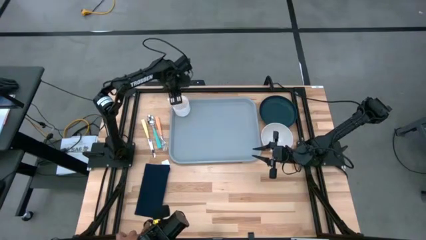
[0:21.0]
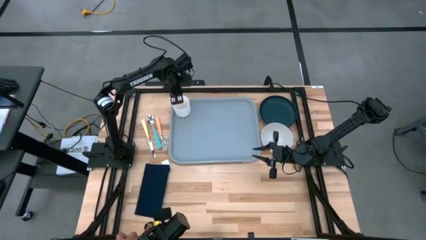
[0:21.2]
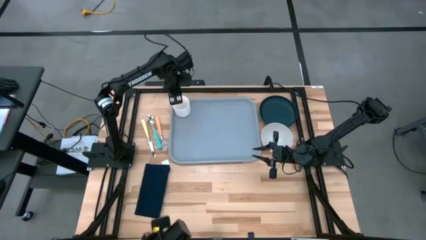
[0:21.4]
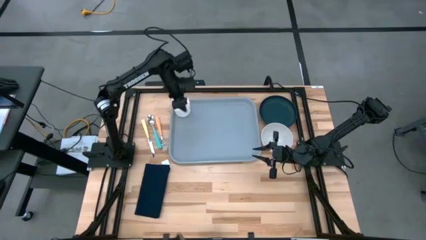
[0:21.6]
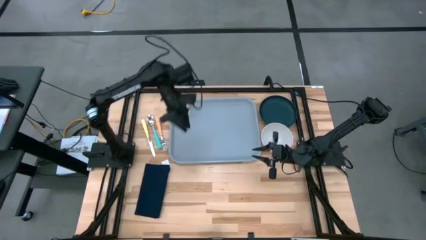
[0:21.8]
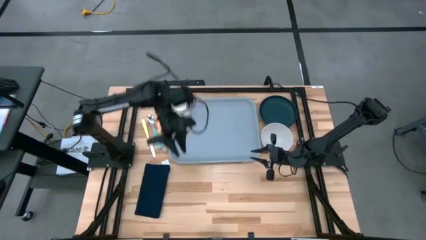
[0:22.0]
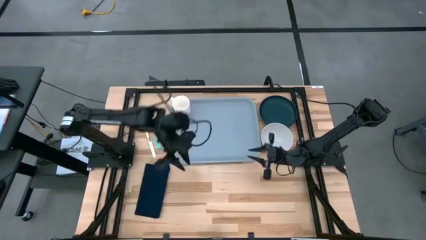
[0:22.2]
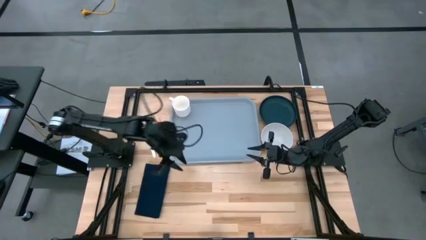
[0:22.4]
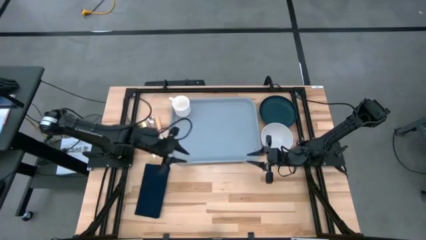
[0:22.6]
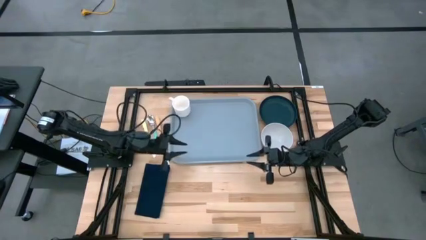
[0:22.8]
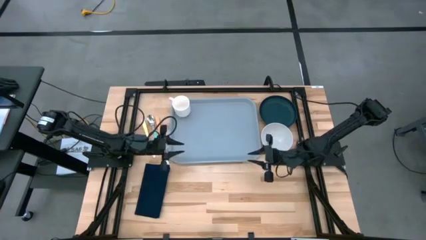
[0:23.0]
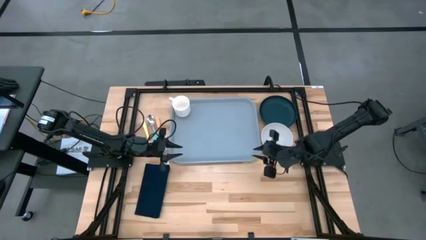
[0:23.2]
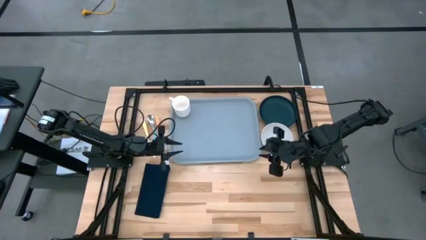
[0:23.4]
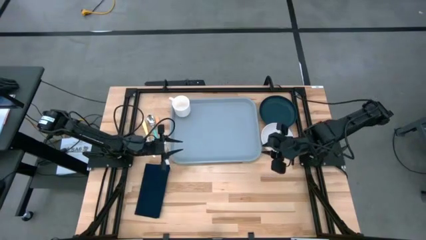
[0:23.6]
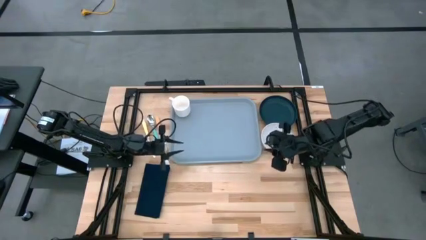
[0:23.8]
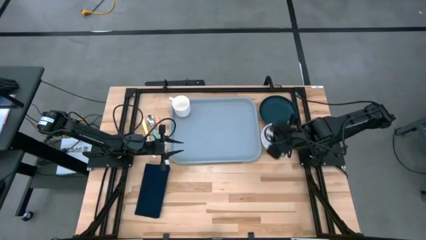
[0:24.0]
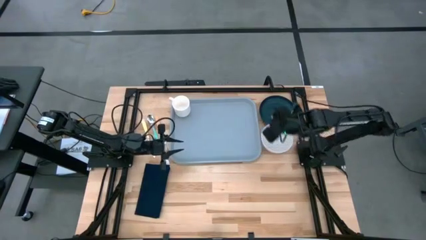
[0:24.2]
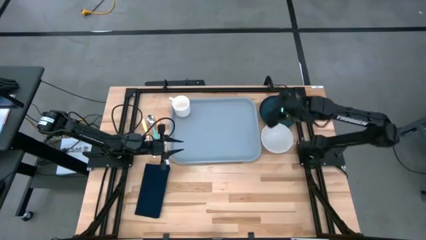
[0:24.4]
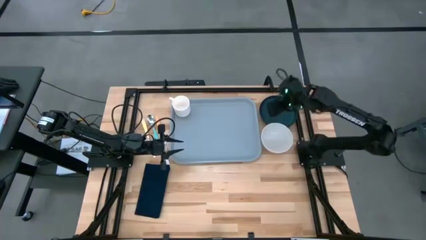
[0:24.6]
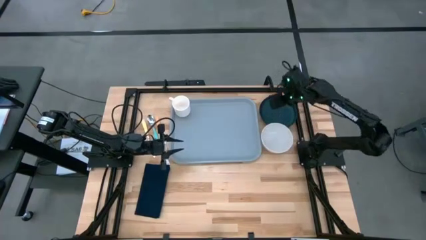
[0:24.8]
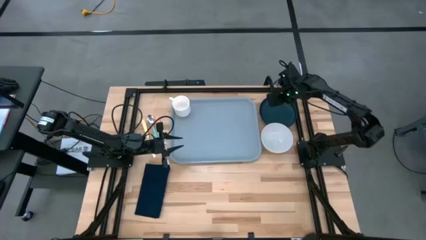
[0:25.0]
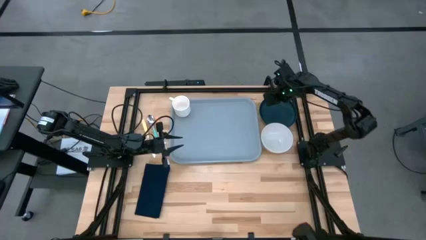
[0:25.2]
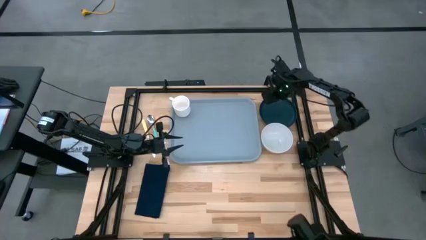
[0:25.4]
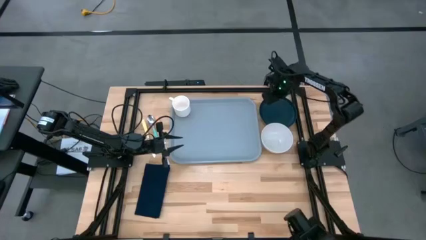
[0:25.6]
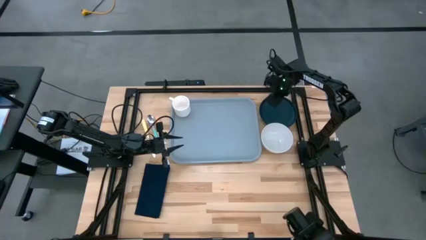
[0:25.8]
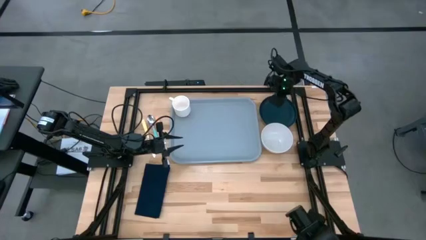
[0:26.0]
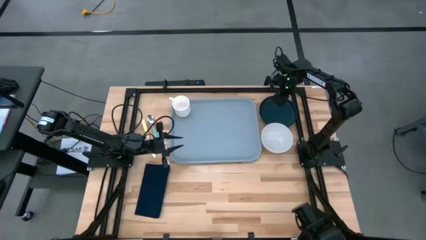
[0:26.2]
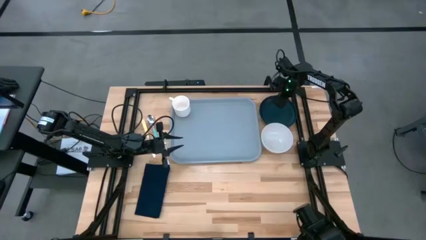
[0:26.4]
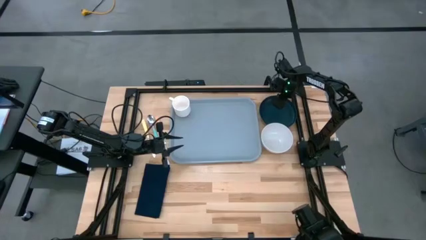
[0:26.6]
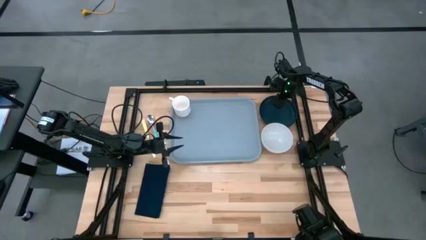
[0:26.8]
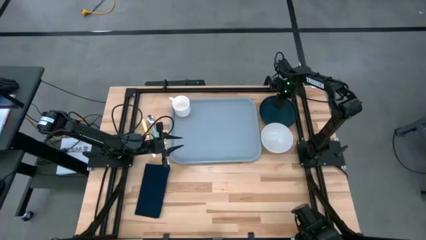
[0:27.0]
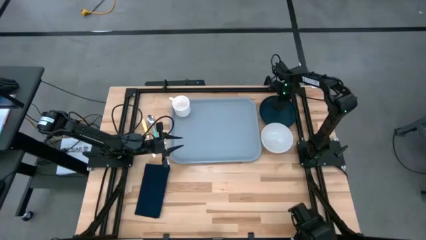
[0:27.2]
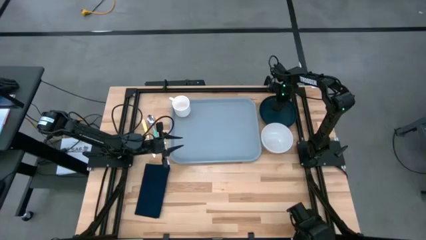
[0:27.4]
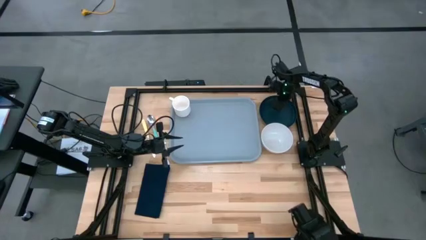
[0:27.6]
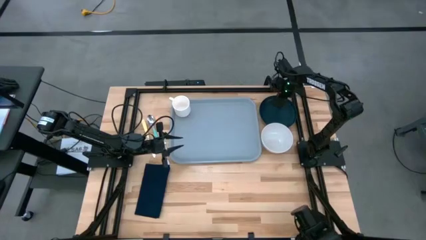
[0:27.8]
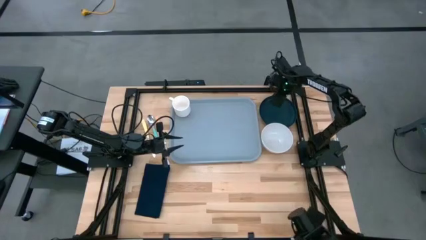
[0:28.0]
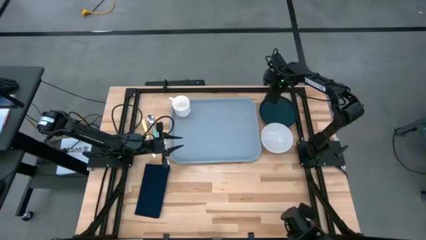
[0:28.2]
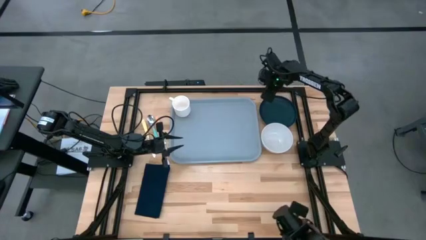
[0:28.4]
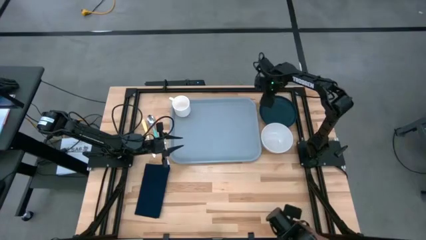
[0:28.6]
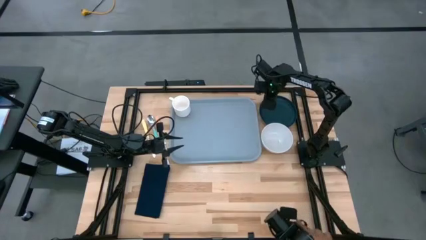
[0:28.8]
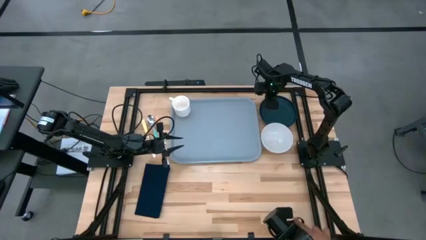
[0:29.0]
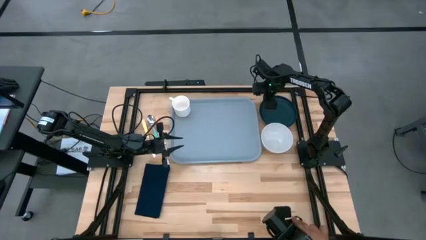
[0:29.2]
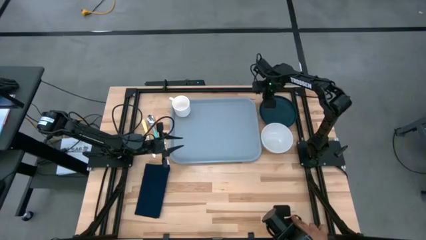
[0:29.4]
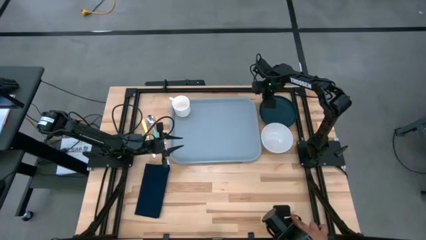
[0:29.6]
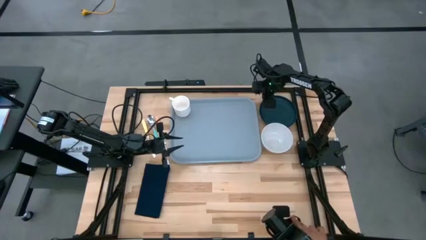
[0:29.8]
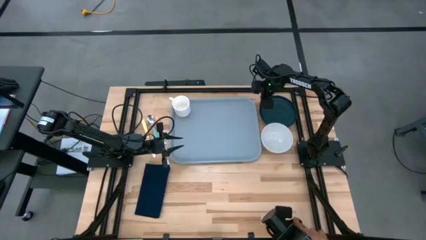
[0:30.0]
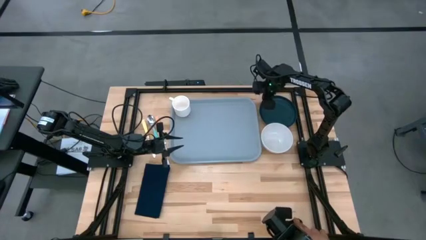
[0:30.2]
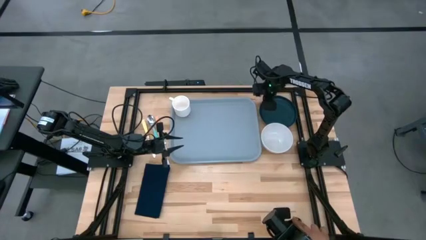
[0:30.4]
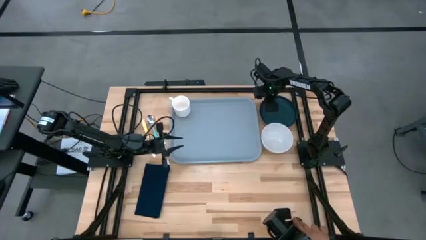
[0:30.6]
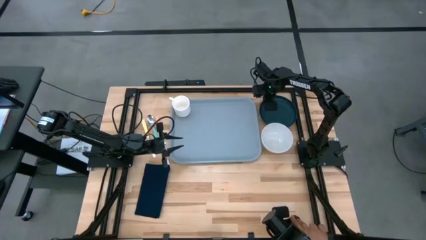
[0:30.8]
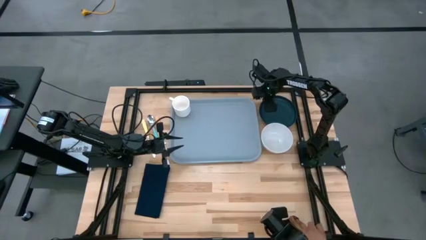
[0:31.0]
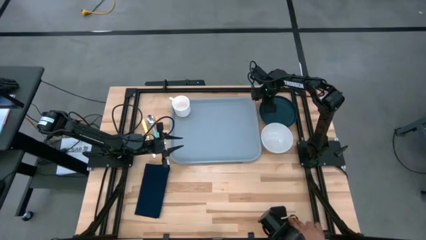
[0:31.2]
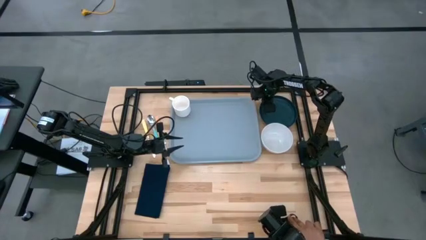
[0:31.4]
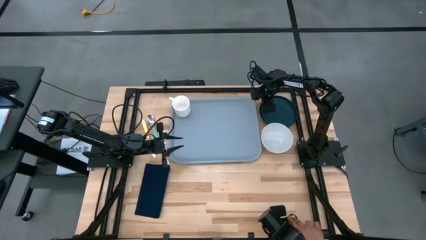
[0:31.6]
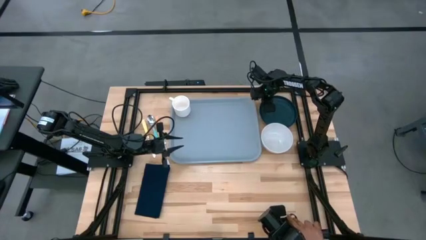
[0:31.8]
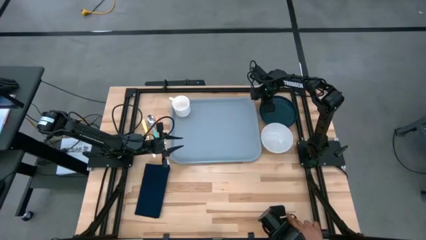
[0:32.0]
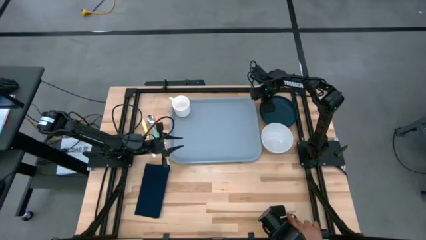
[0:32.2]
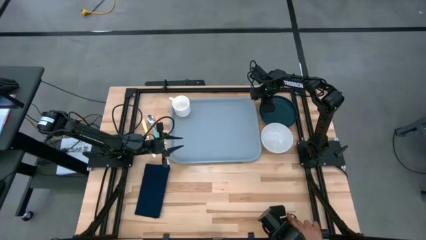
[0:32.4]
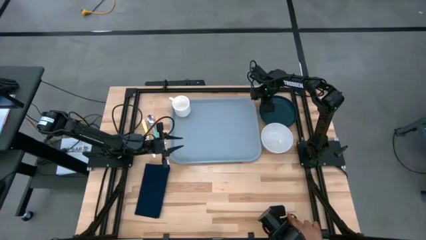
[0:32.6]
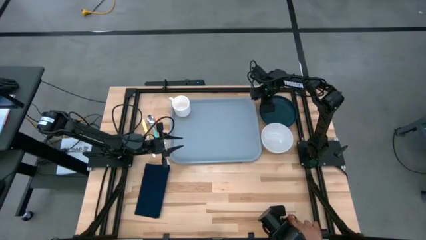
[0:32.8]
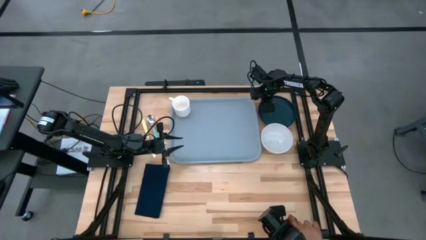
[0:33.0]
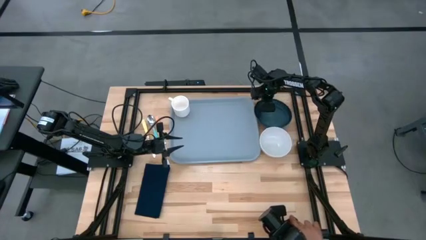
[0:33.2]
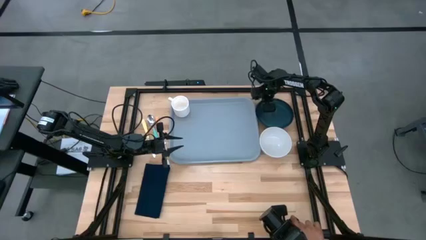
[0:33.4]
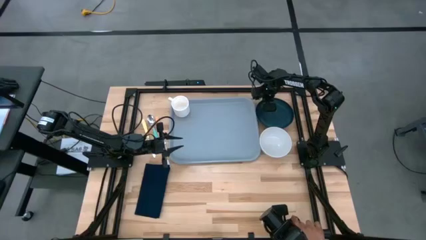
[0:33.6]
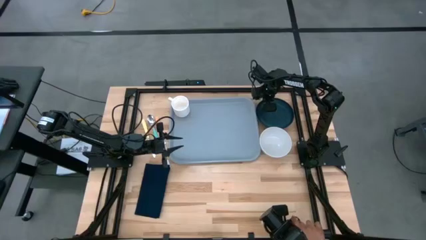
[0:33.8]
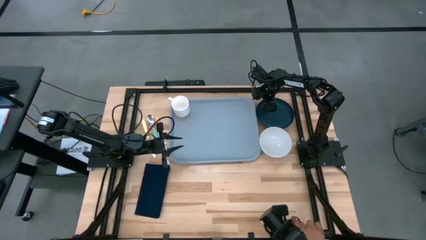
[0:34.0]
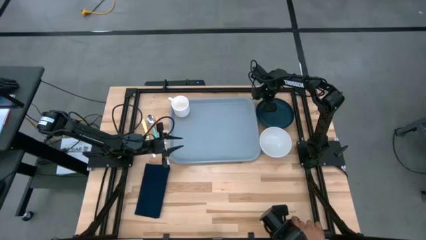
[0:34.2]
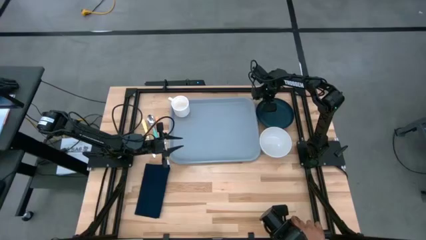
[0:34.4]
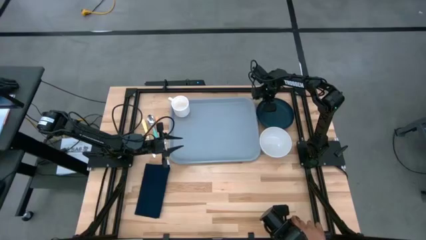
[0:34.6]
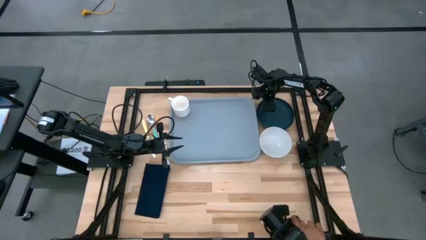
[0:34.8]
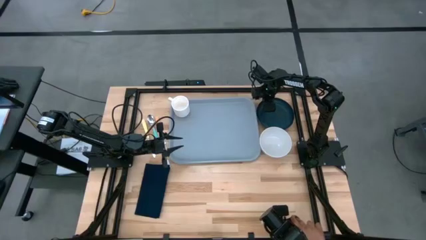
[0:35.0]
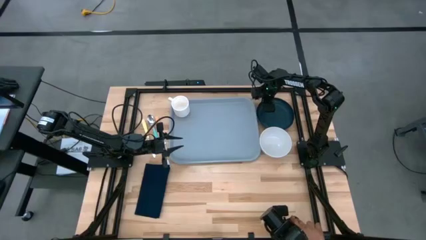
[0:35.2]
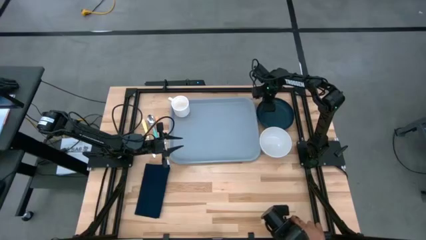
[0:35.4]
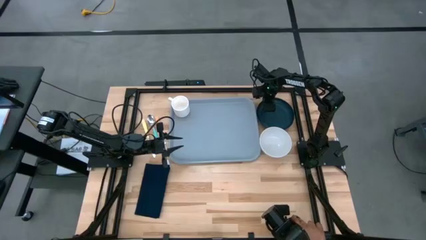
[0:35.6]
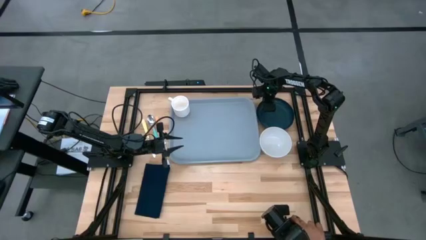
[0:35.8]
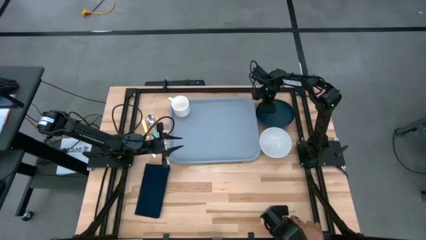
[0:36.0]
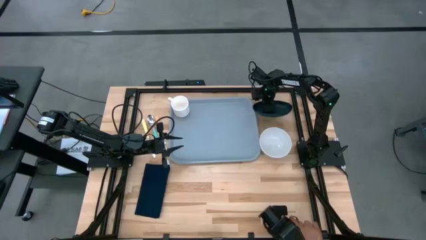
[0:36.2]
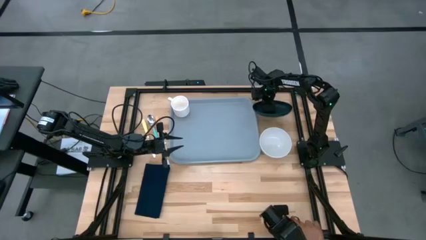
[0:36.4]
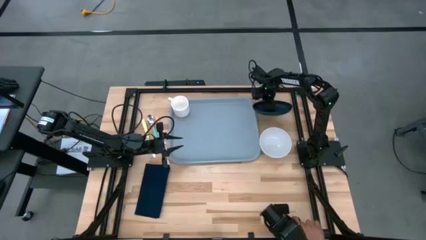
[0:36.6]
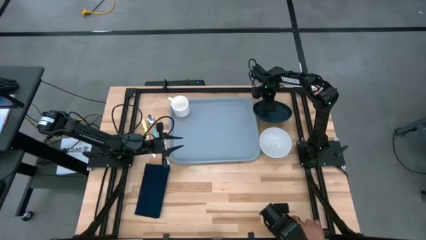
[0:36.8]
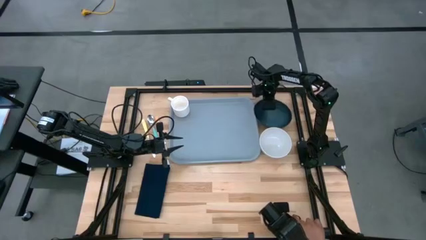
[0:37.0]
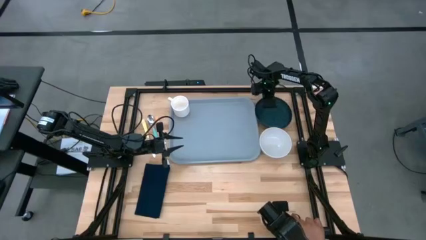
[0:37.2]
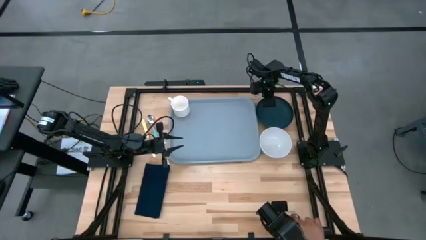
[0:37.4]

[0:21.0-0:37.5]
Task: Set up tray
Put the black plate on the gray tray to the bottom right of the white mug
